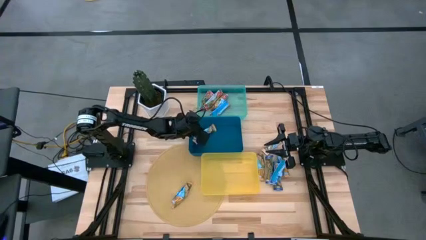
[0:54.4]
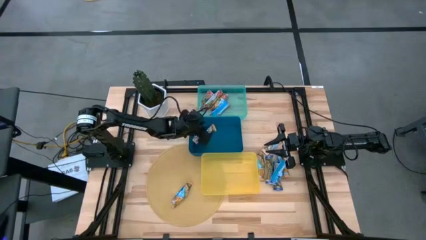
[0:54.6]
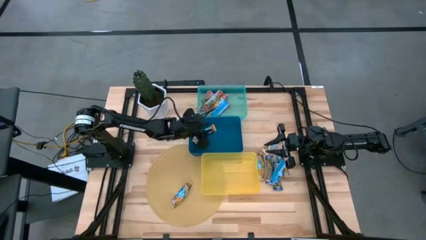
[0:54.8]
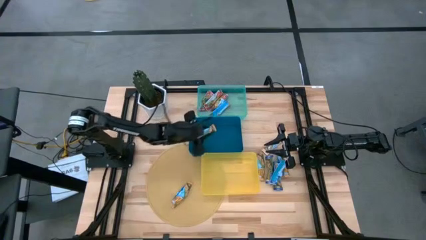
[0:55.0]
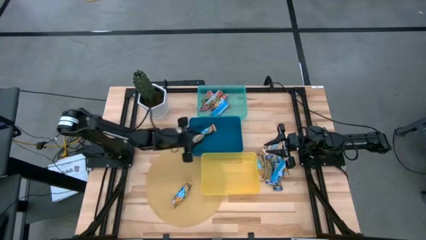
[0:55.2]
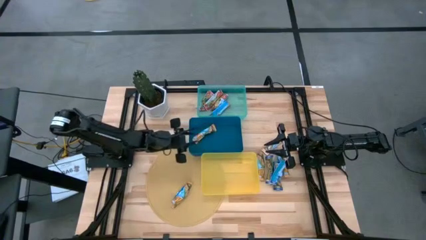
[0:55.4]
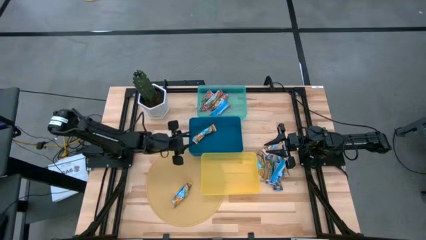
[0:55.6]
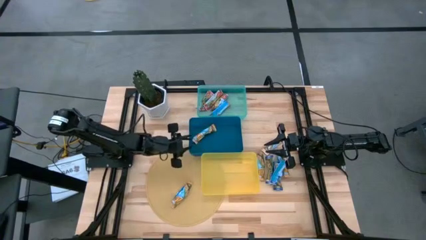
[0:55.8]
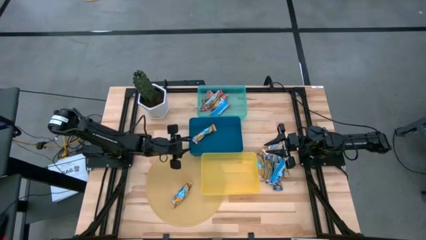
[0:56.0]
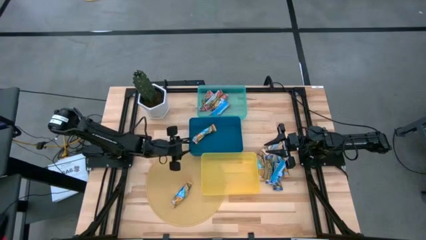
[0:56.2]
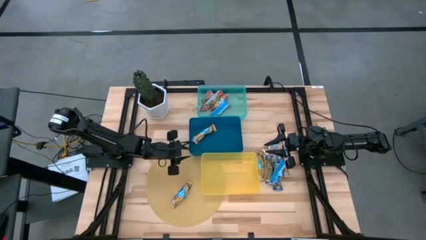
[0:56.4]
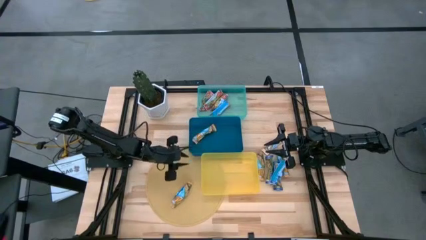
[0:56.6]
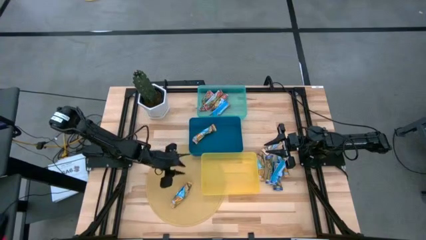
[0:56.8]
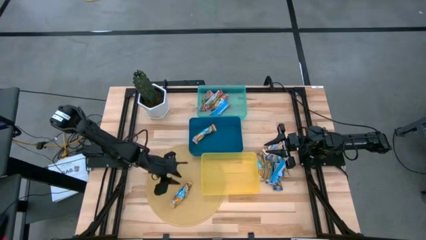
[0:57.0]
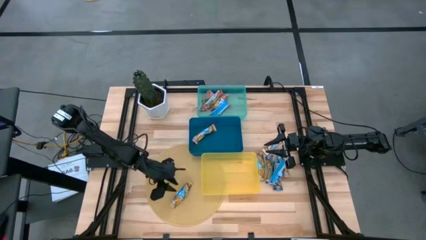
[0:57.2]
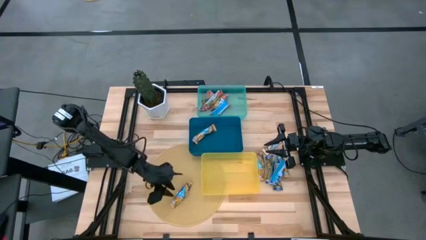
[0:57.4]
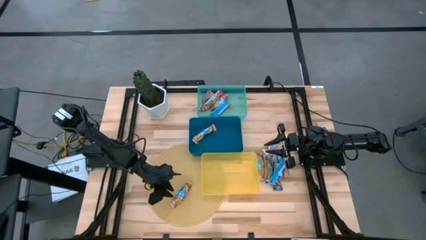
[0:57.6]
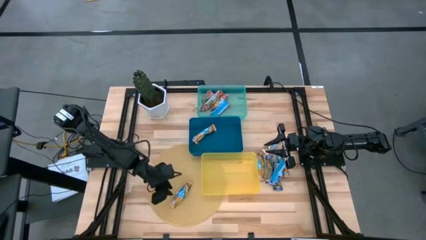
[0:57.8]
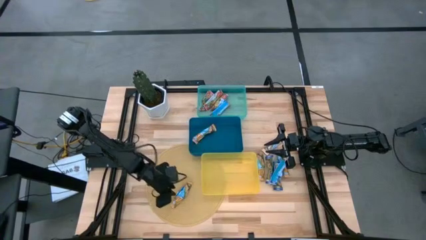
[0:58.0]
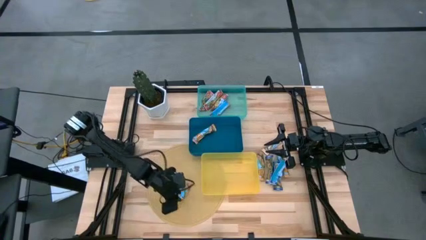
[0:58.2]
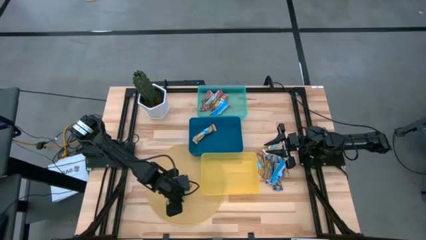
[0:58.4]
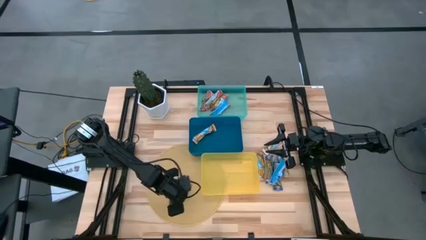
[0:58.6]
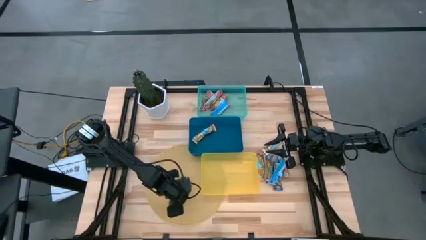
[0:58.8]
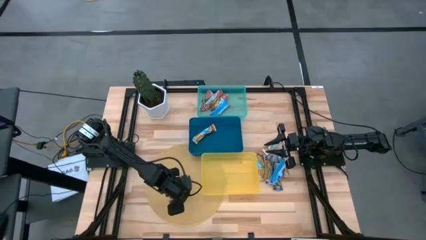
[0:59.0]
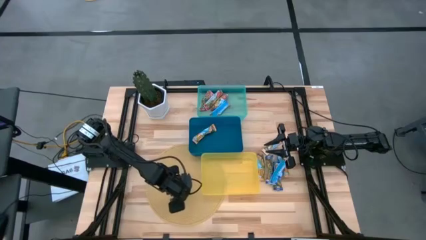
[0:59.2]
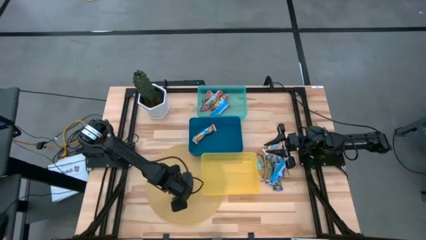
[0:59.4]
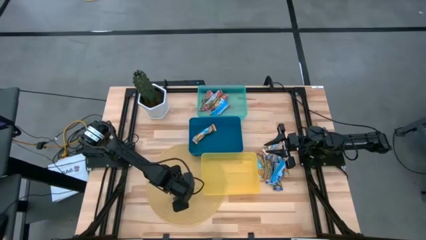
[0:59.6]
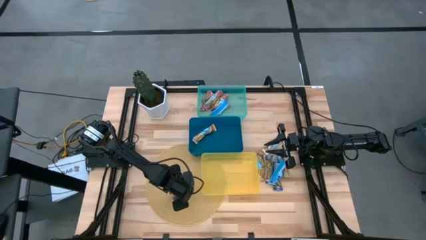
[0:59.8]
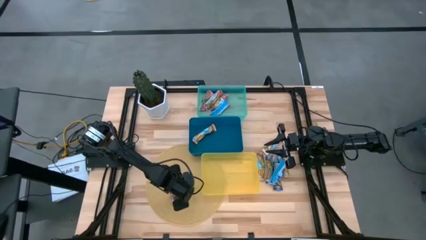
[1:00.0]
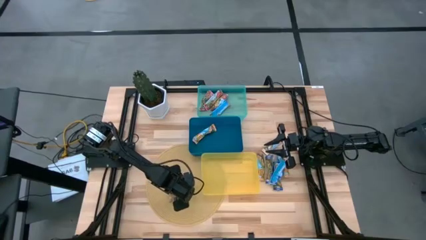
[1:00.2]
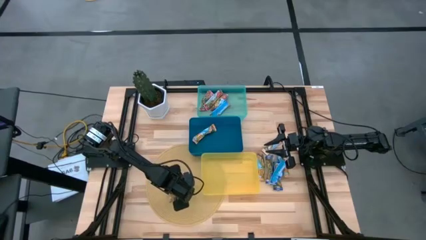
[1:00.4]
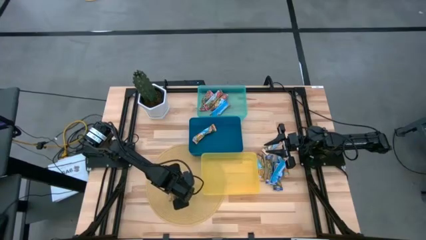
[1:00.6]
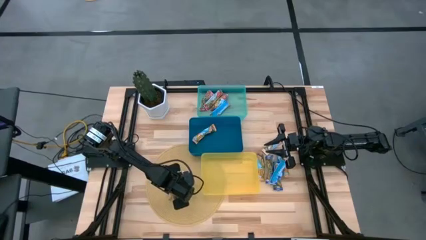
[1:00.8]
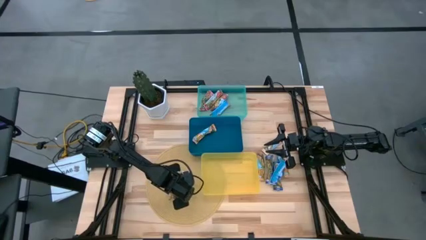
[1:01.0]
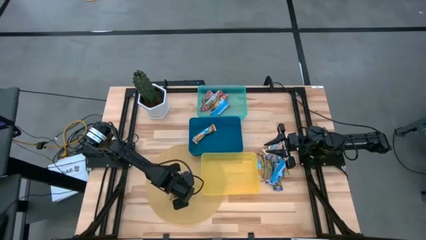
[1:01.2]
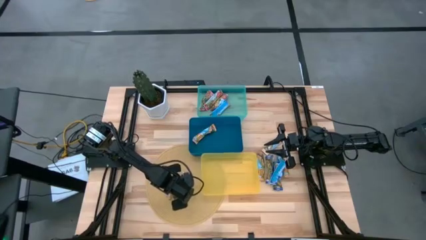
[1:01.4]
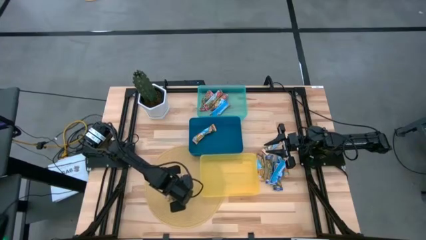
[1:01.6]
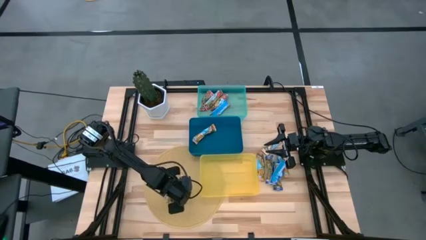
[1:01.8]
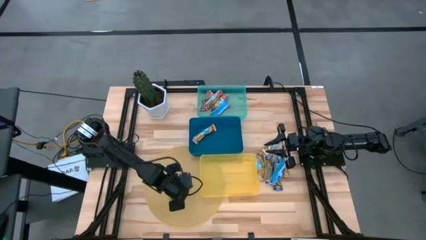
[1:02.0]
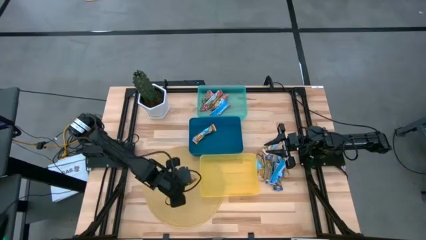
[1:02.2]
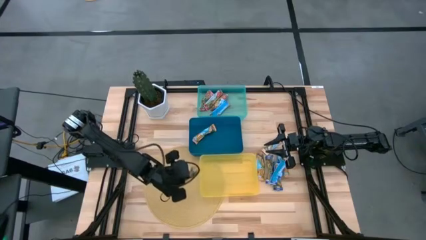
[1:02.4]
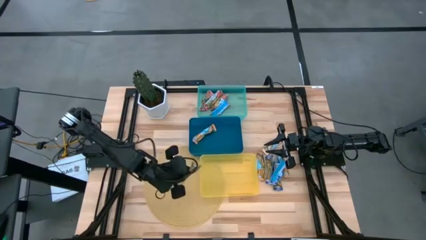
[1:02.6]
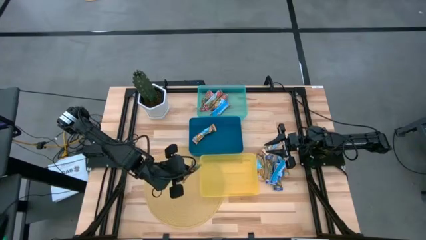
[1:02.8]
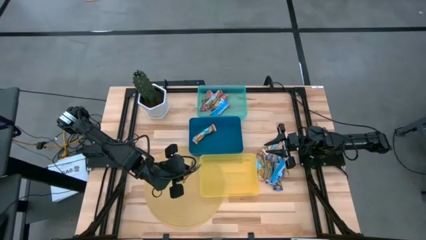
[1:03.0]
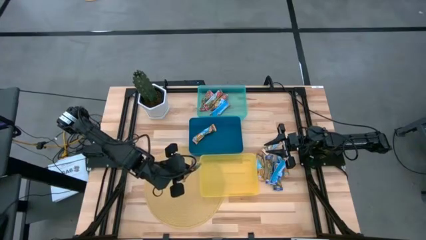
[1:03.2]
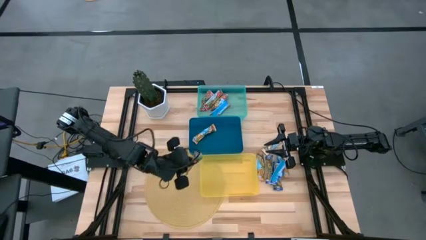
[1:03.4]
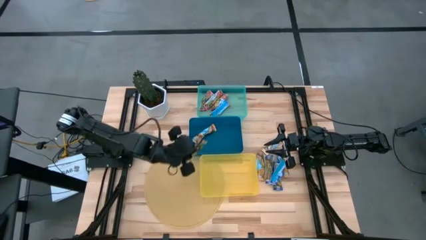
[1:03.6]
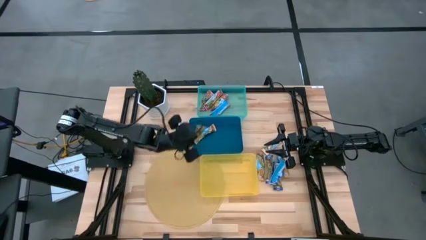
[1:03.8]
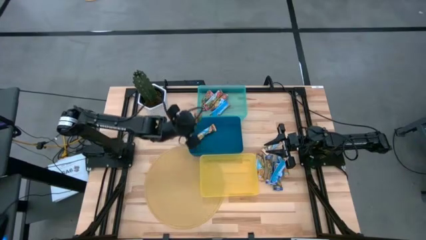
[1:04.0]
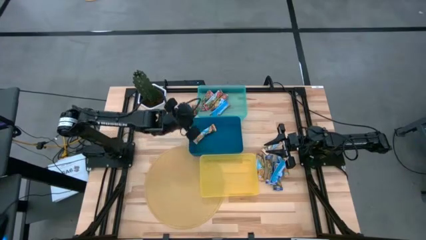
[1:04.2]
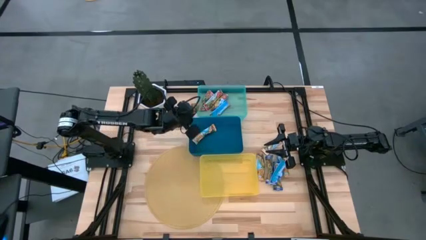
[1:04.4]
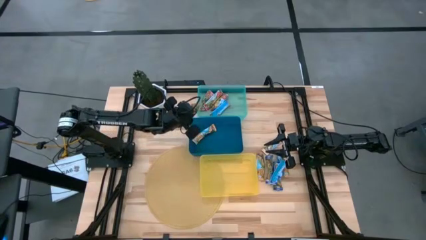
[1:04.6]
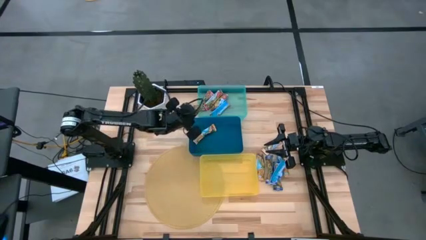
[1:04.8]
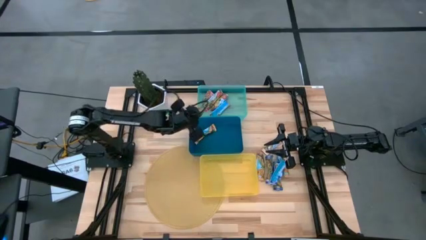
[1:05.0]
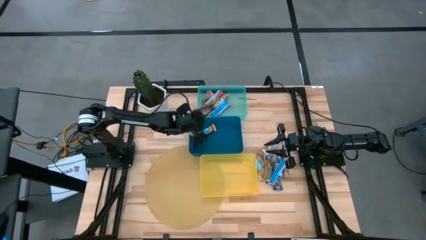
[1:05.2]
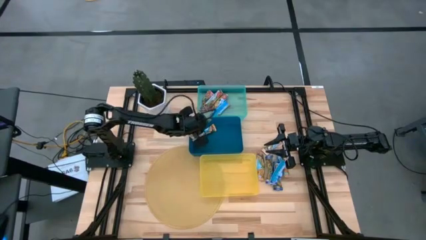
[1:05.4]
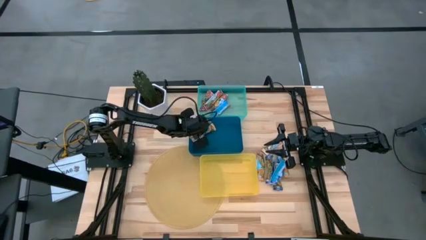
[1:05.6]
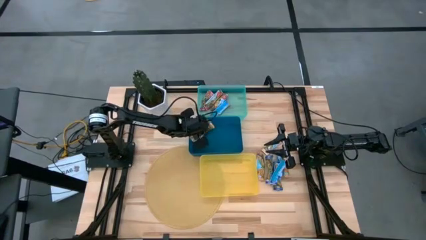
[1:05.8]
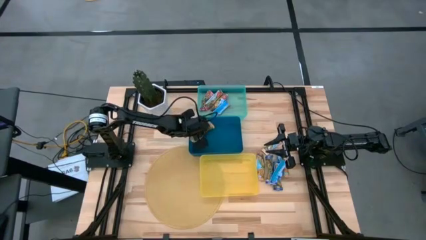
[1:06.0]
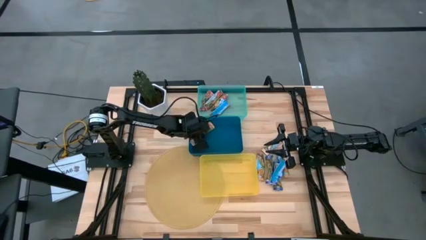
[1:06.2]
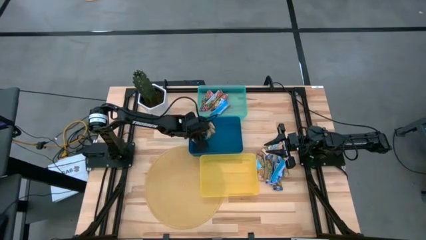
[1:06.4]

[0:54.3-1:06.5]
Task: Pick and place Granola Bars by type
Put the yellow granola bar into the blue bin

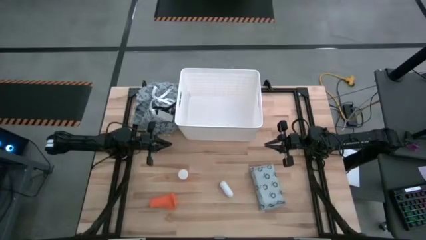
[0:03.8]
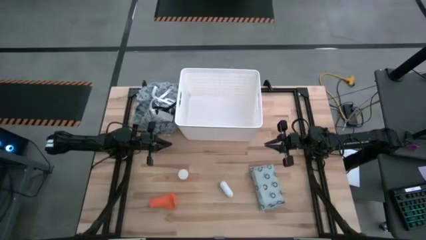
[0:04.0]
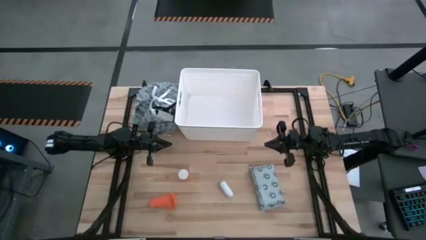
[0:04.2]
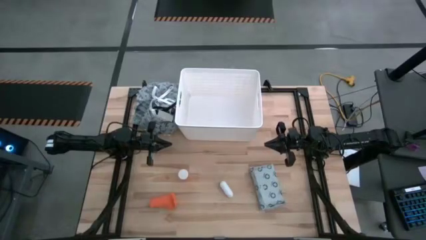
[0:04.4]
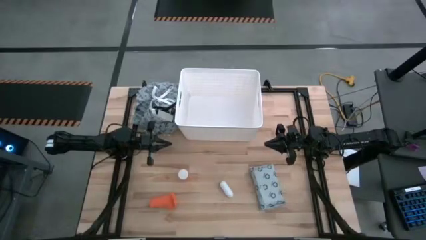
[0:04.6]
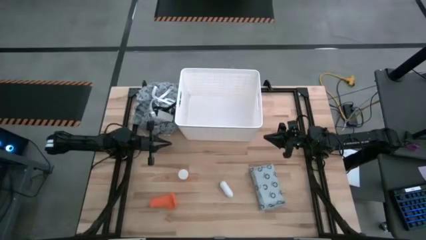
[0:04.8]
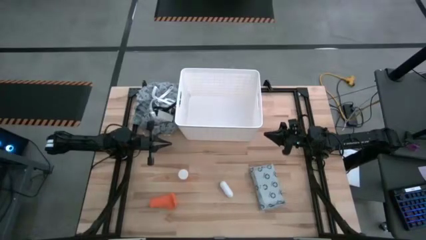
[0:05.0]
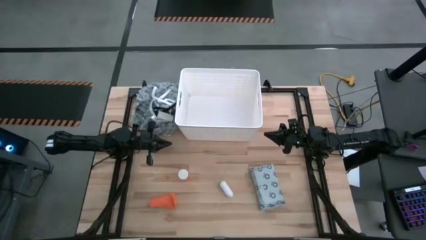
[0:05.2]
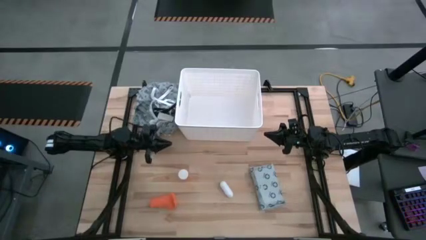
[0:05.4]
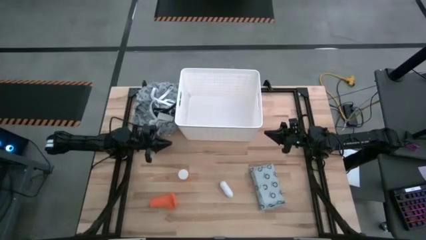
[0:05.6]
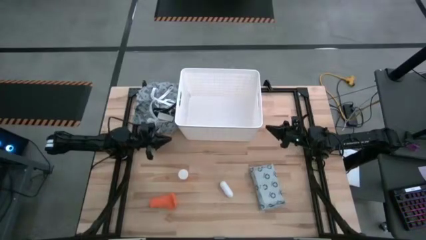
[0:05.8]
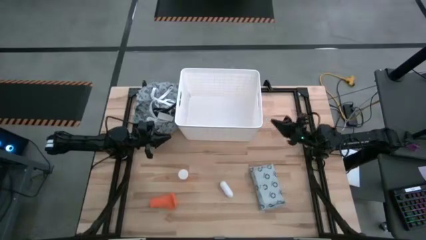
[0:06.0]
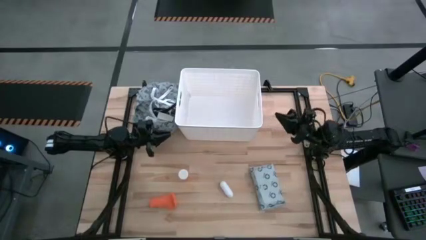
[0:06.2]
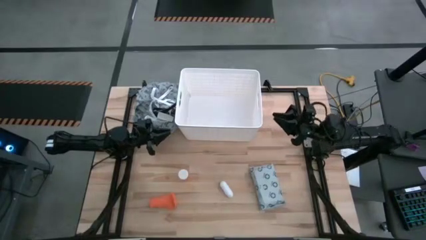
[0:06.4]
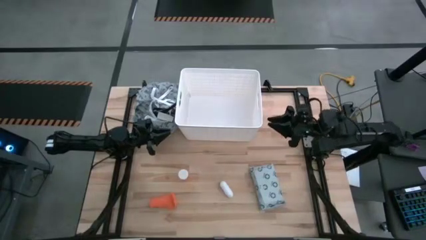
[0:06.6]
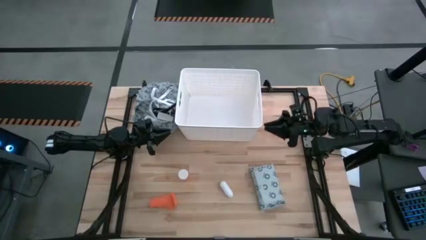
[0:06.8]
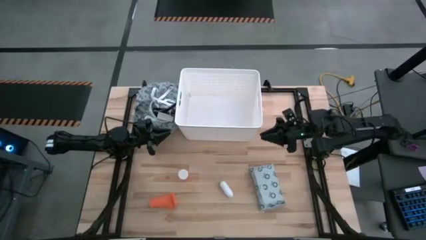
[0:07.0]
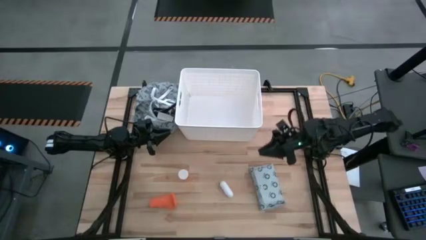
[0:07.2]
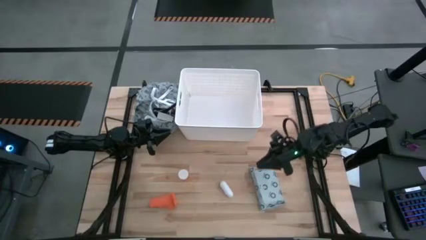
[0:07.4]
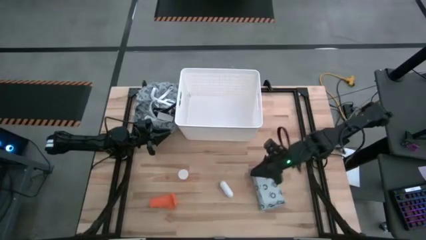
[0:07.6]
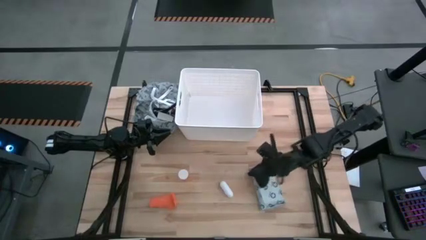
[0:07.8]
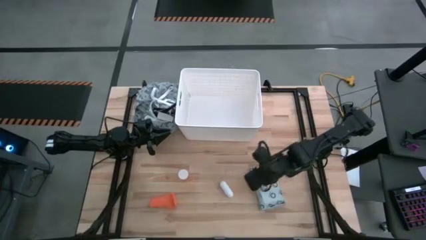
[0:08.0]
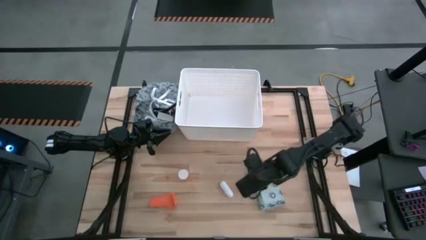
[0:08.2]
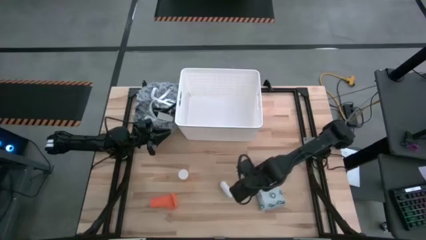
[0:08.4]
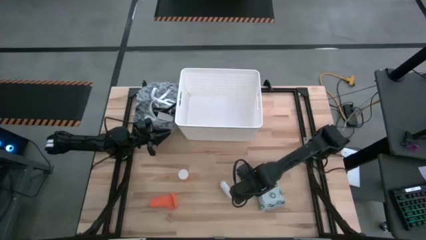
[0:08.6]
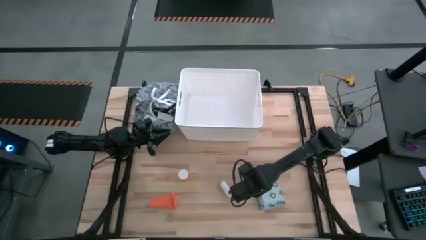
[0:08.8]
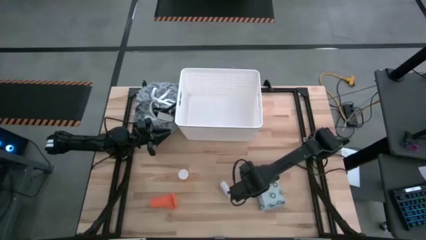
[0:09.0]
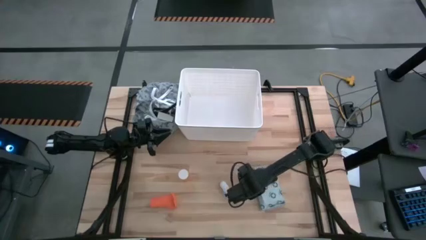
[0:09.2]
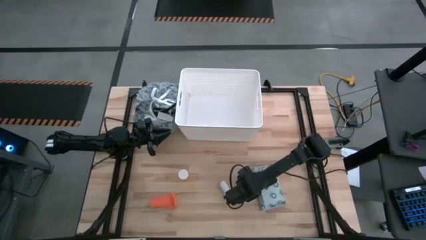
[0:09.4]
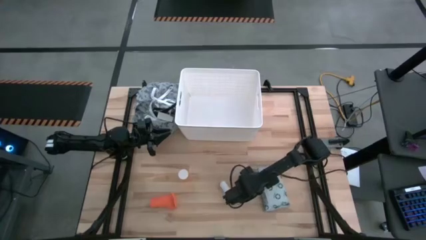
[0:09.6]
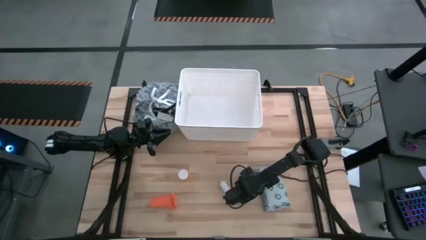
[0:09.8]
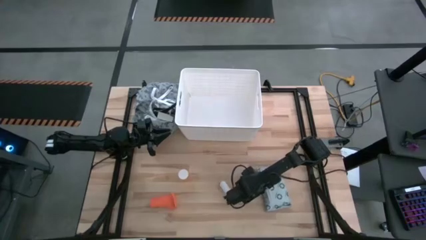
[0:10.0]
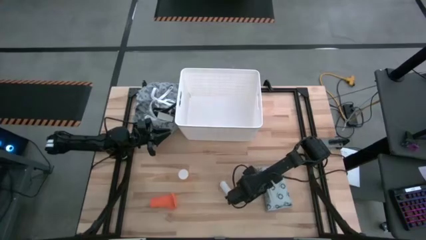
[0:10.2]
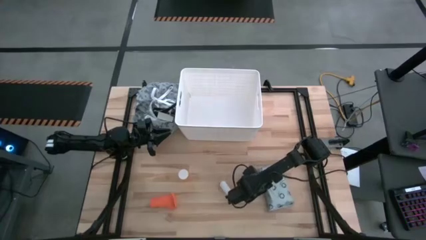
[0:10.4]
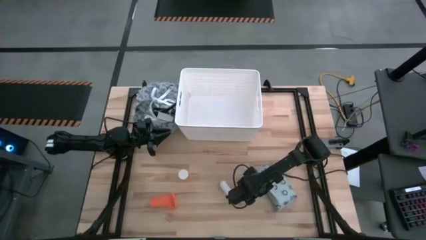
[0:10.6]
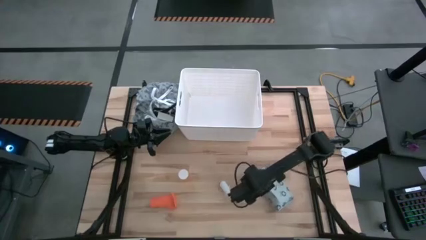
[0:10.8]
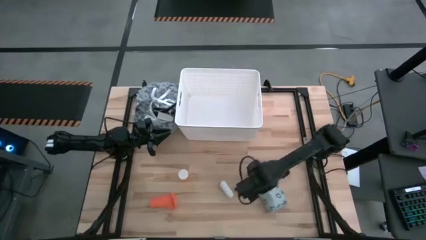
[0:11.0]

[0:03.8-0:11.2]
Task: Pick & place medical supplies in basket/bin
Put the light blue mailer bag into the white bin
